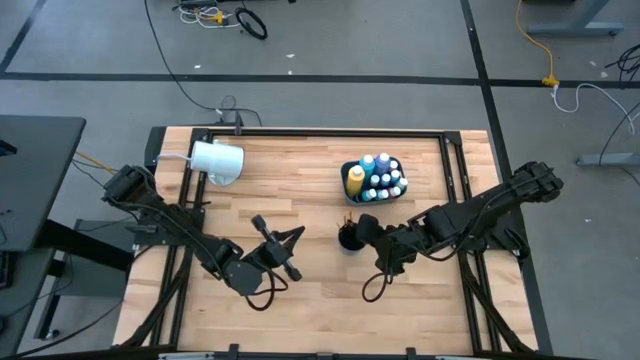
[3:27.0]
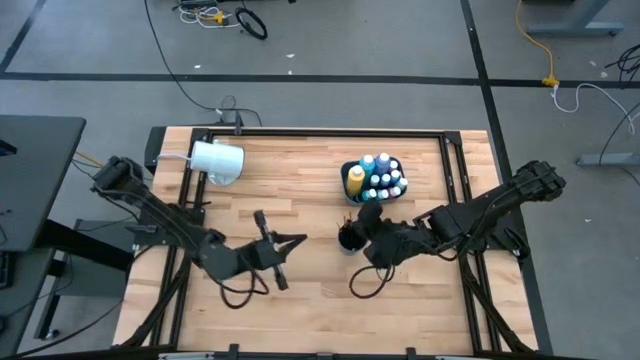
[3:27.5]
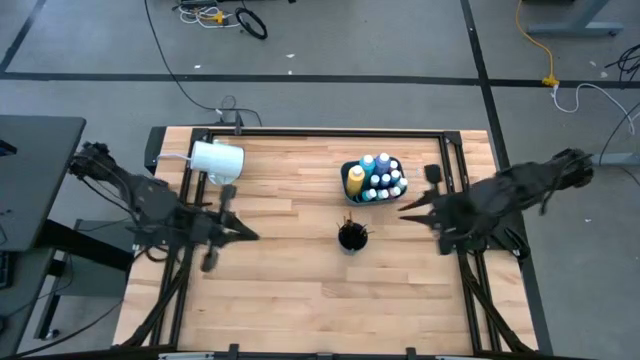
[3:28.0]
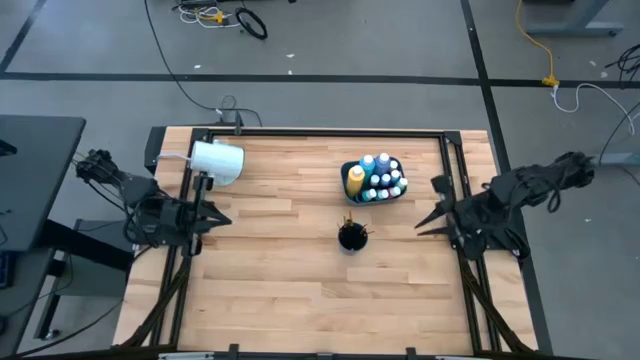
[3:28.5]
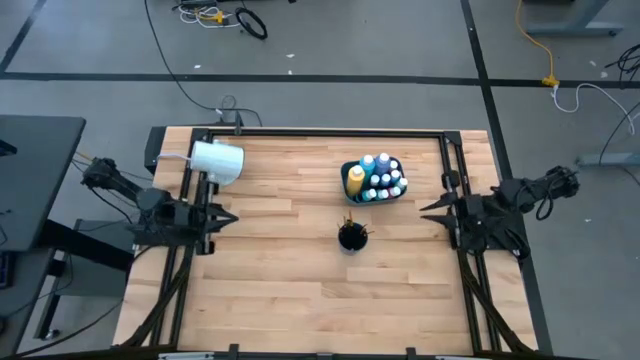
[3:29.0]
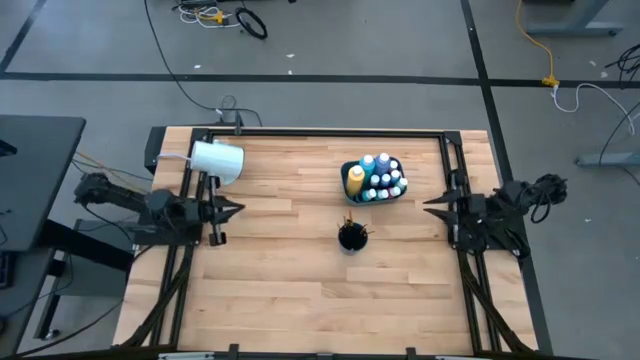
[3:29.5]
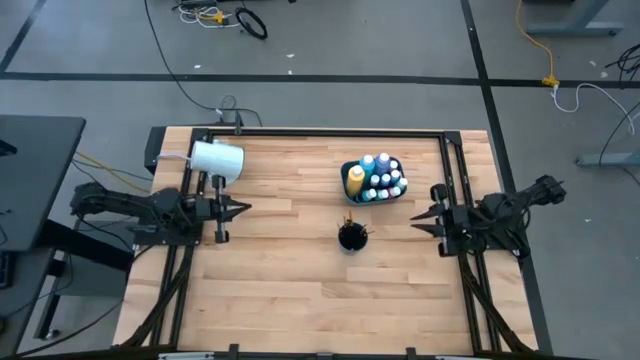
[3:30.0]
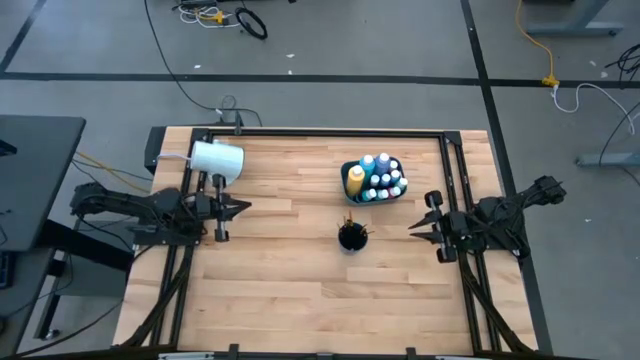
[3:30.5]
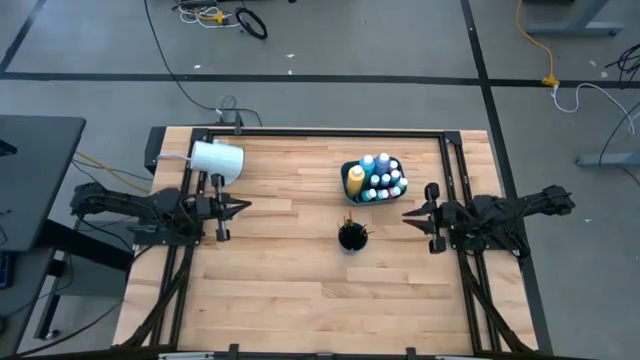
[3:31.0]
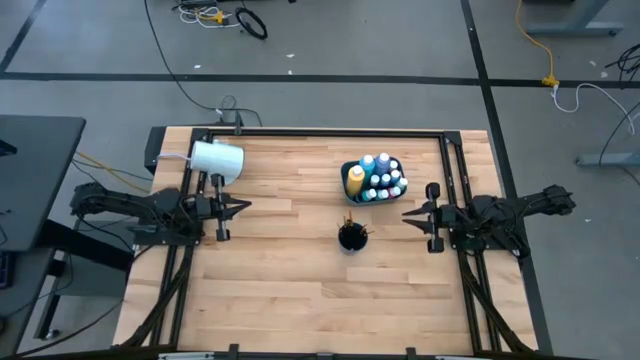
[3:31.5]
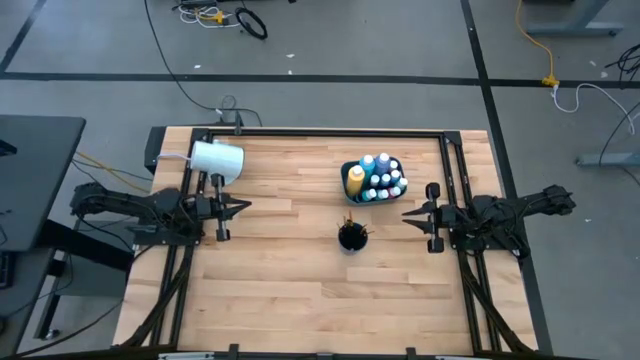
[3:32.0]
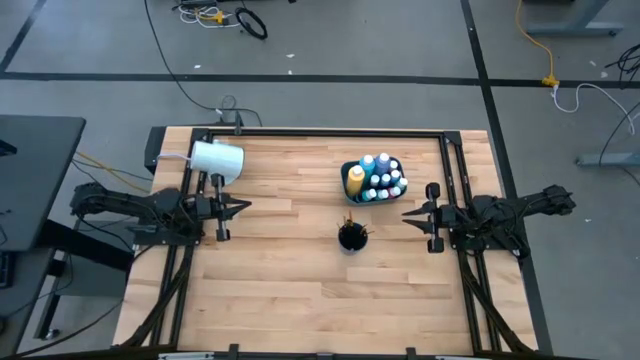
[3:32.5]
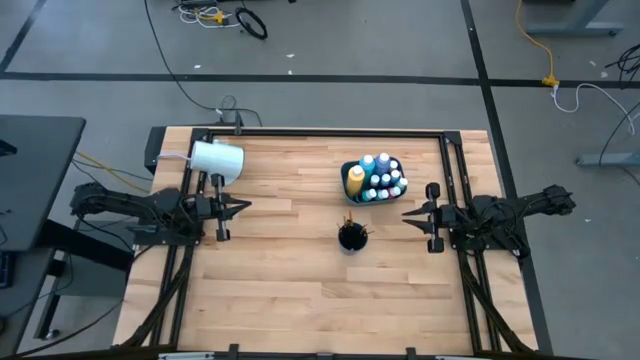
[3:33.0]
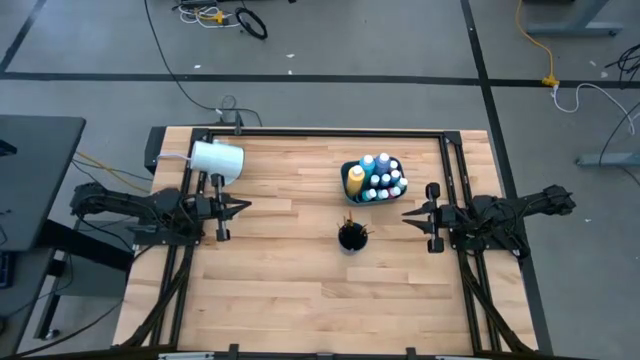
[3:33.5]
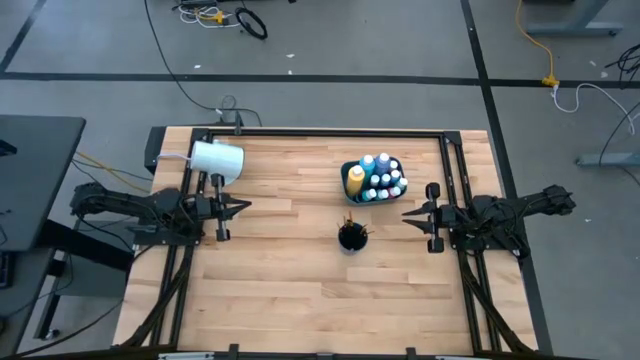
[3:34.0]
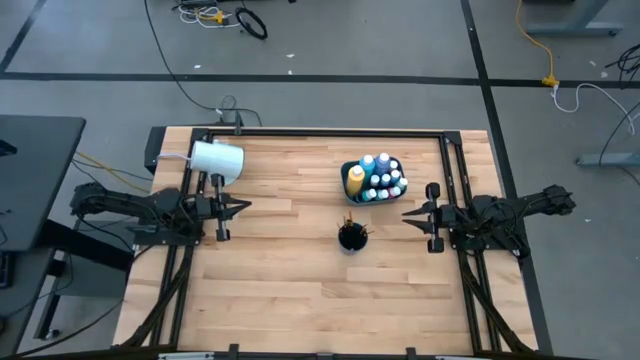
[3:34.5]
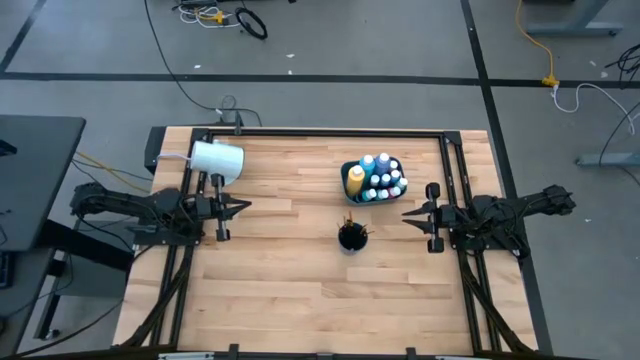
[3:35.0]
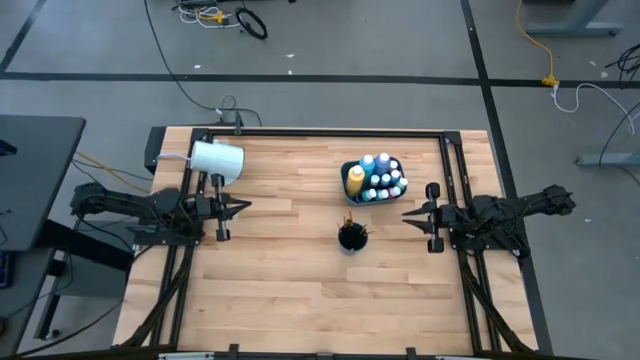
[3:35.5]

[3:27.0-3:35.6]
Task: Pick & Place Paint Supplies
Return to Home Position

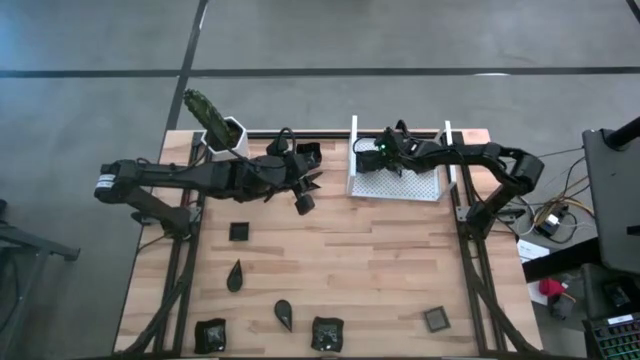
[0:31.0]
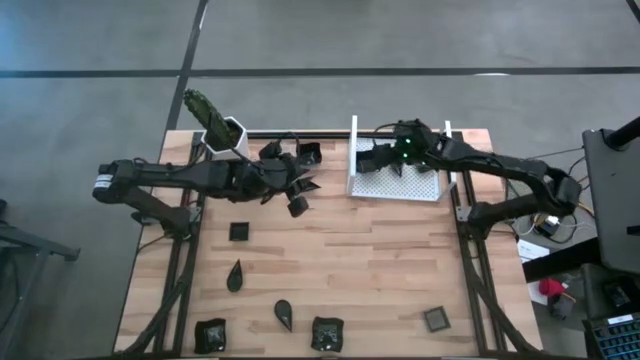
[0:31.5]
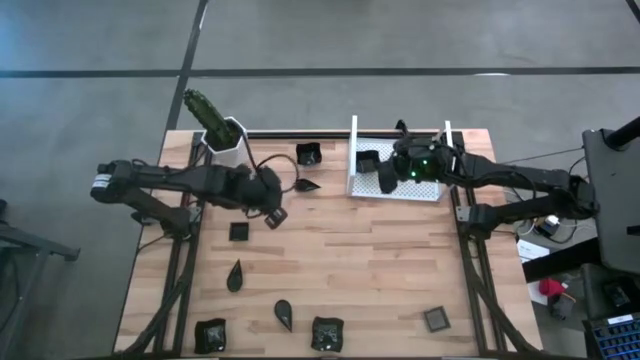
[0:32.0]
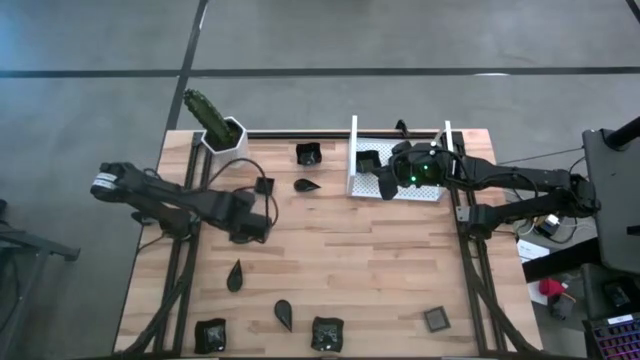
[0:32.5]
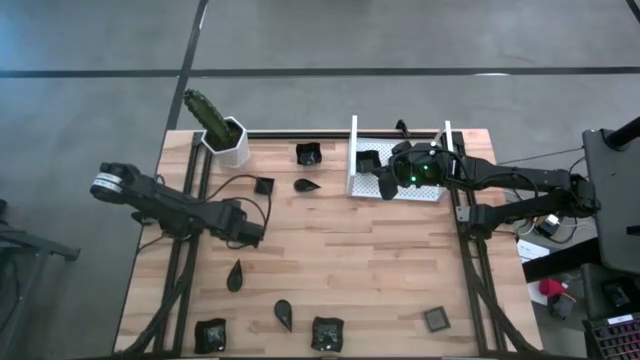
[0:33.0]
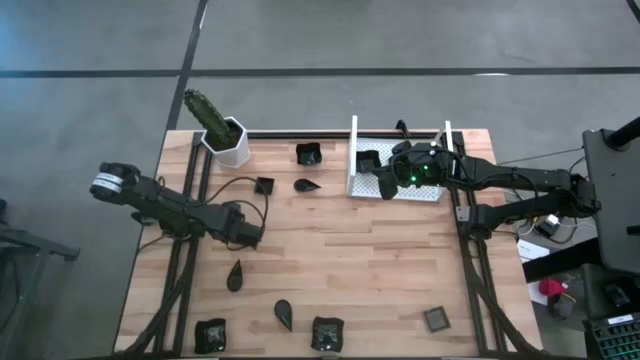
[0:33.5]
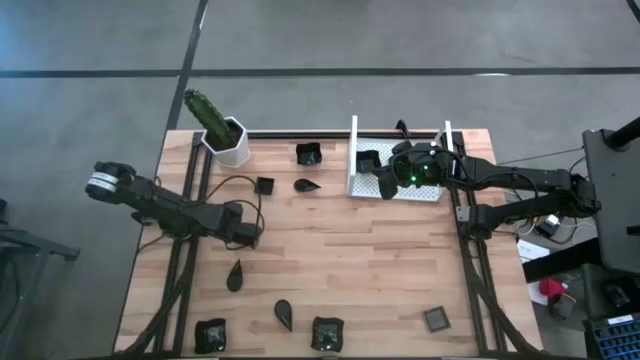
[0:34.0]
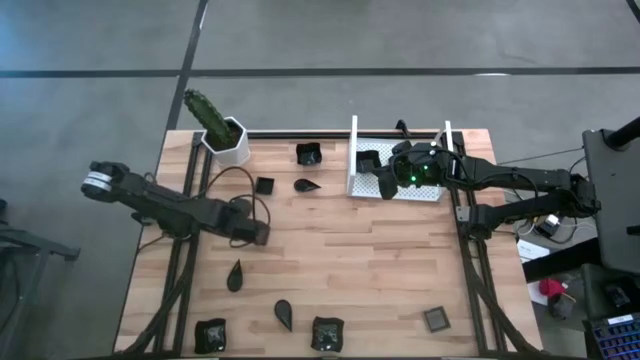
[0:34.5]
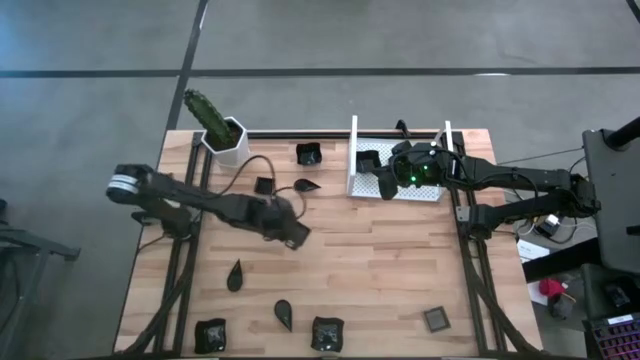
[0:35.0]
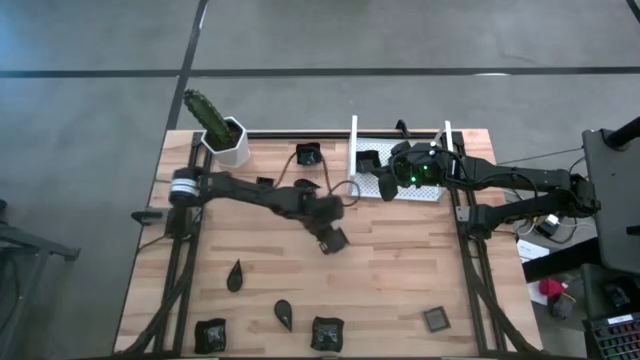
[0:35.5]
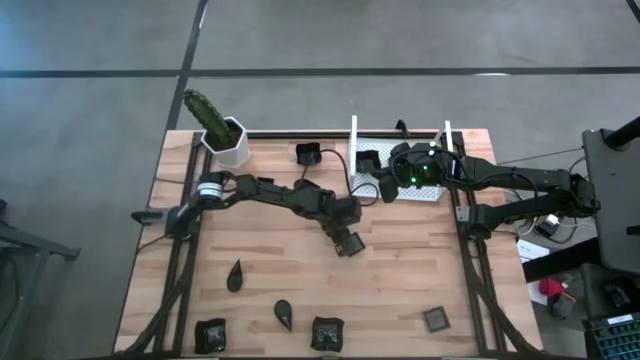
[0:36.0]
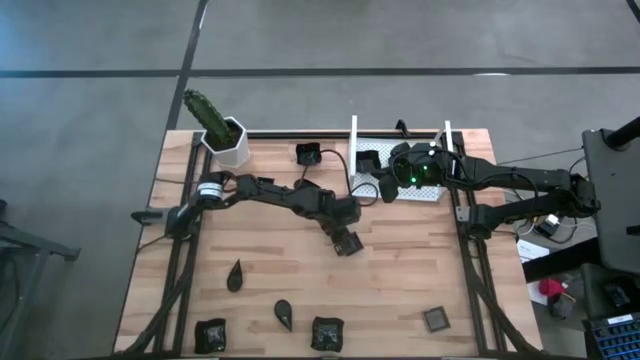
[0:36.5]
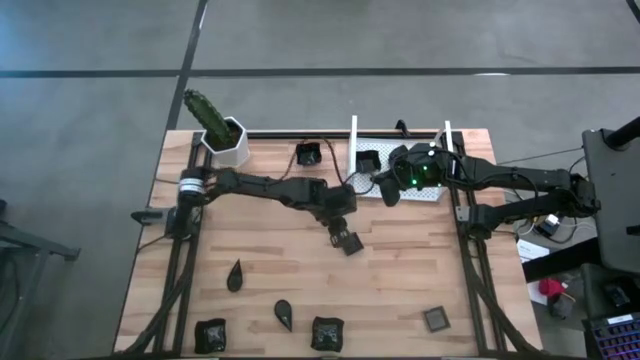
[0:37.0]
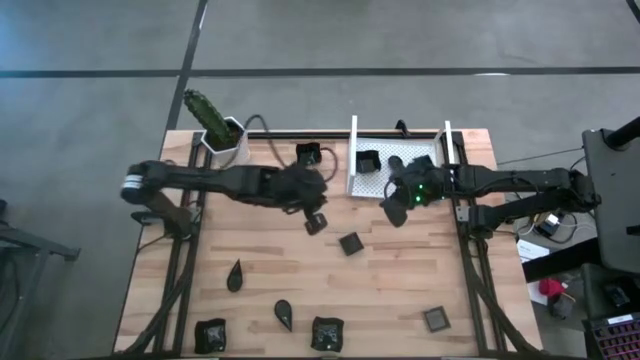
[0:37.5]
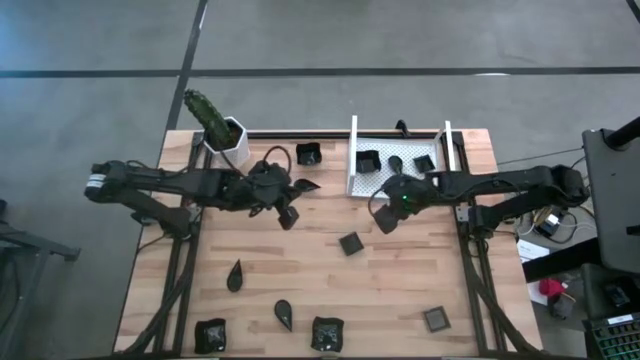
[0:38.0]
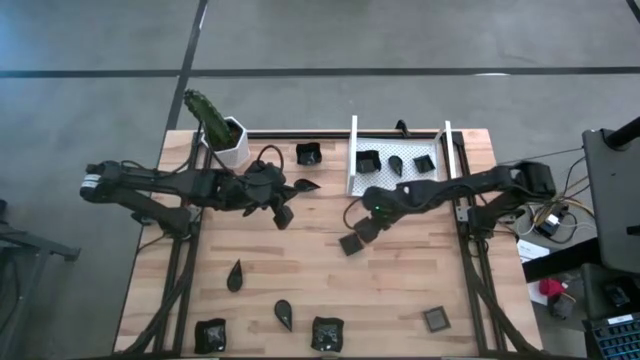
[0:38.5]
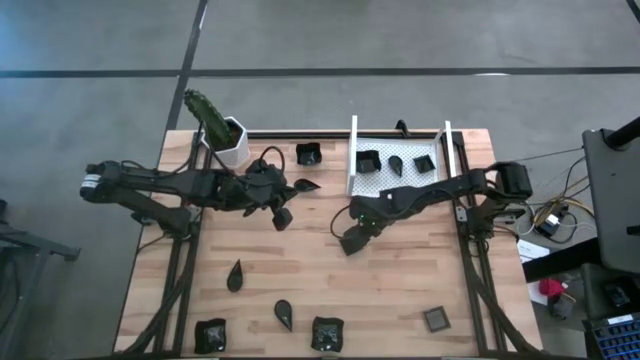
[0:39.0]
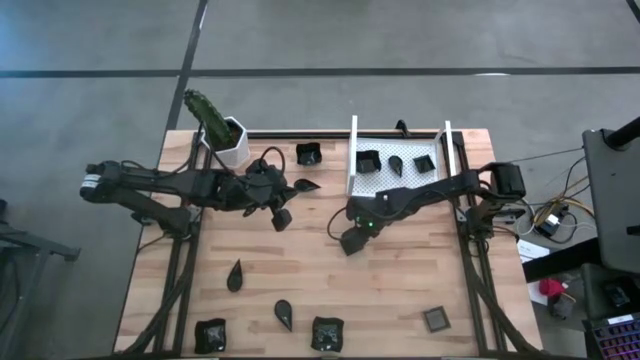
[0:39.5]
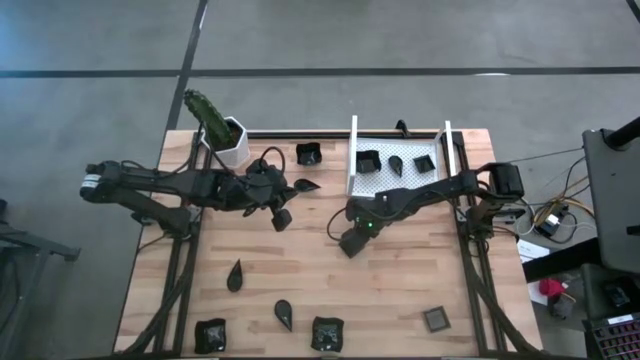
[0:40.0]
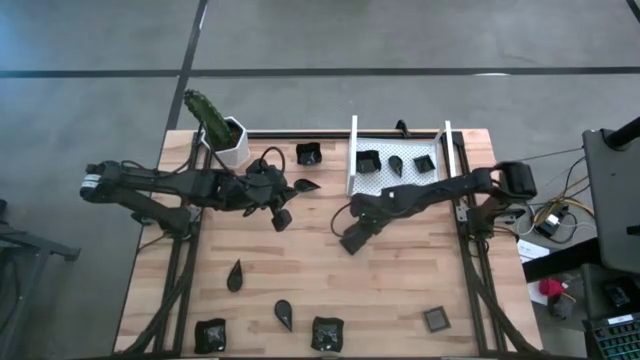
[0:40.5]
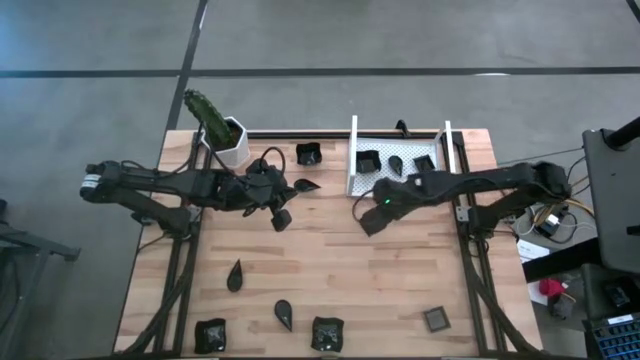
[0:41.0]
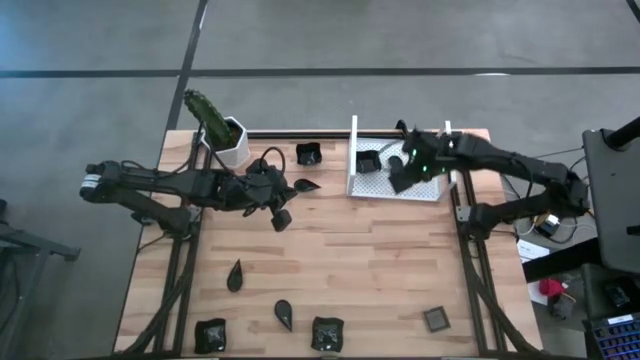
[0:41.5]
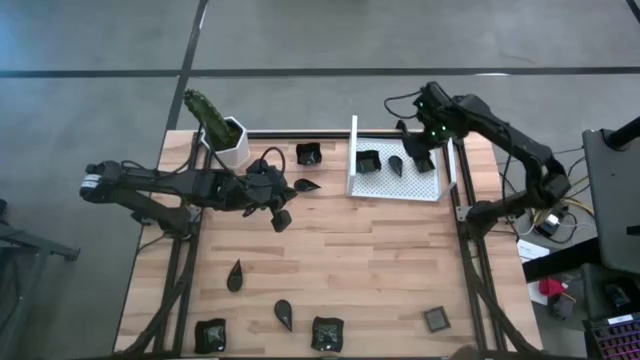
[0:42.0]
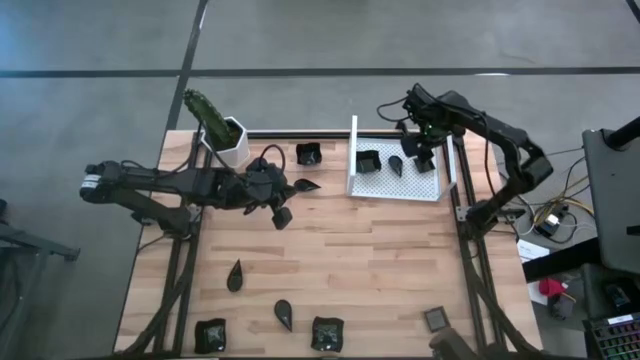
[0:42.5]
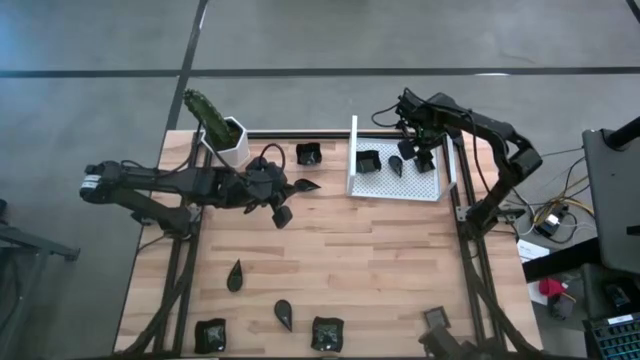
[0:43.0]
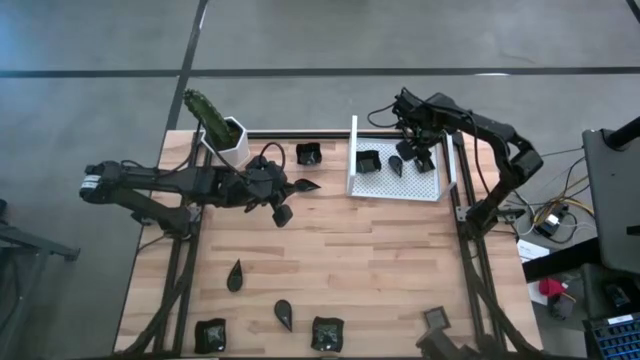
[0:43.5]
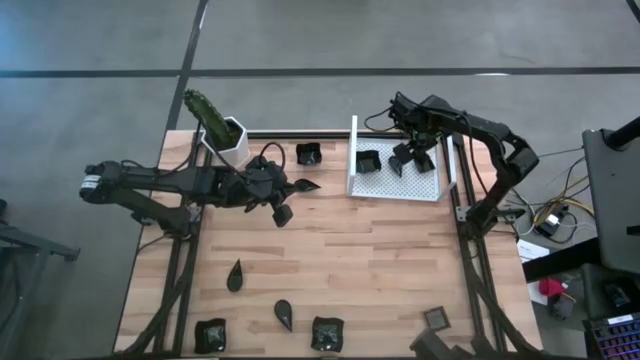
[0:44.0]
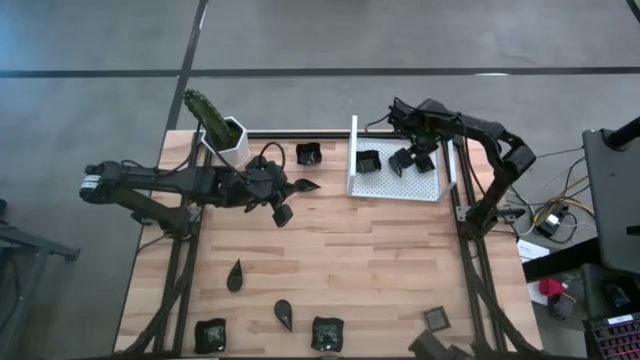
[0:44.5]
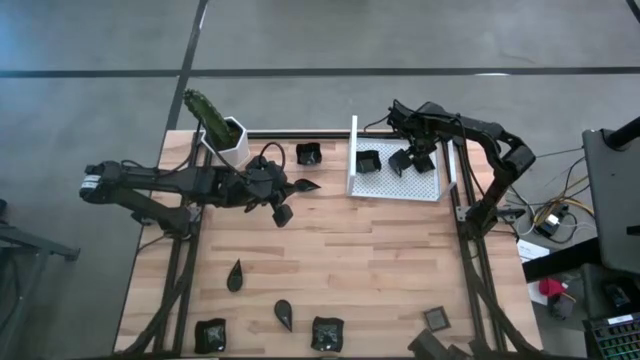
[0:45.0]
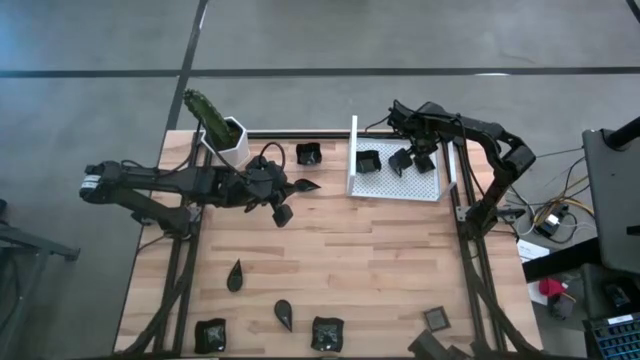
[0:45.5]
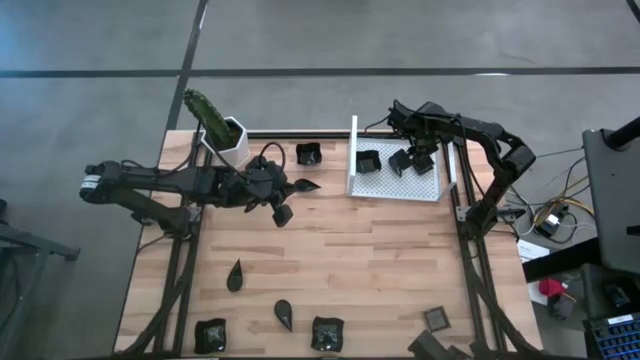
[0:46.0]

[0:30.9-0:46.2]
Task: Pick & Place Mini shaped plates
Stack the black square plate on top of the other black square plate on the shelf
